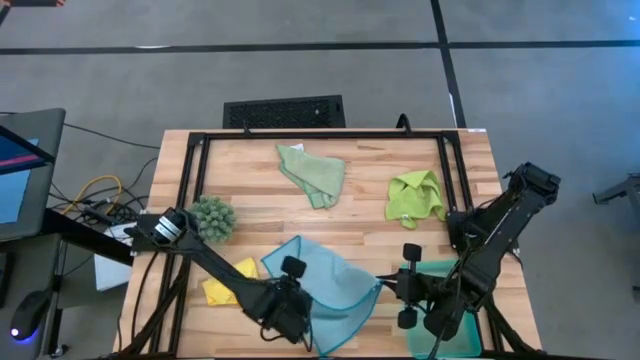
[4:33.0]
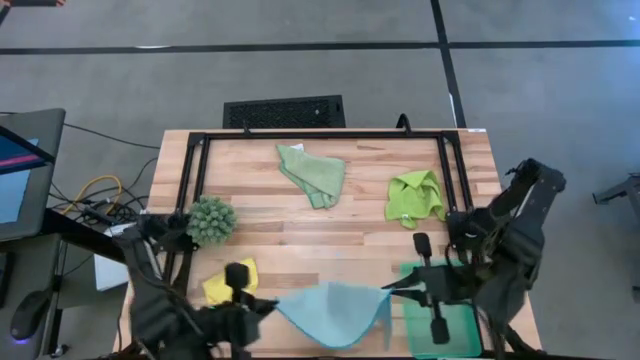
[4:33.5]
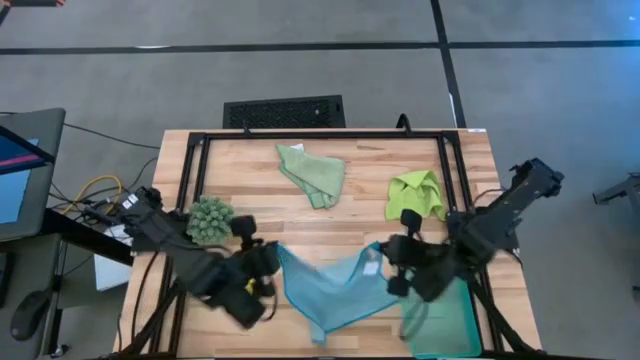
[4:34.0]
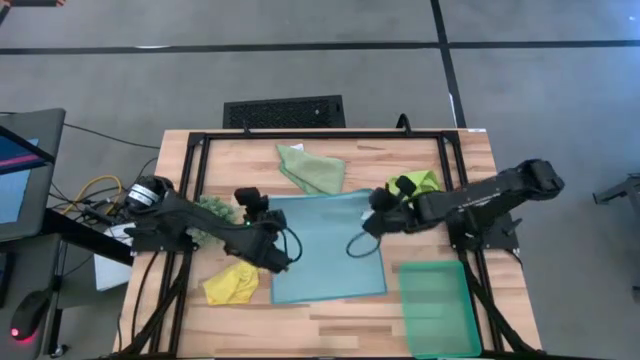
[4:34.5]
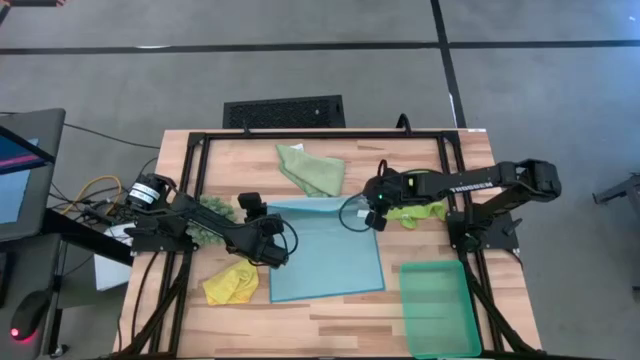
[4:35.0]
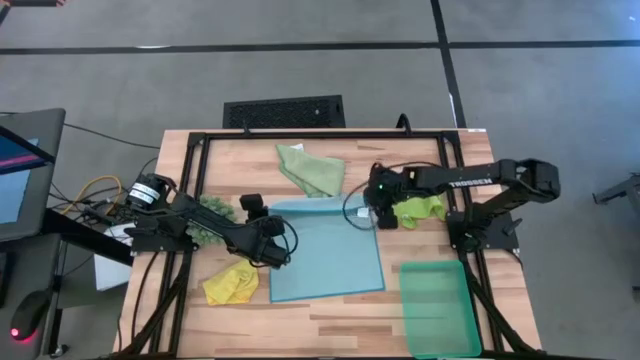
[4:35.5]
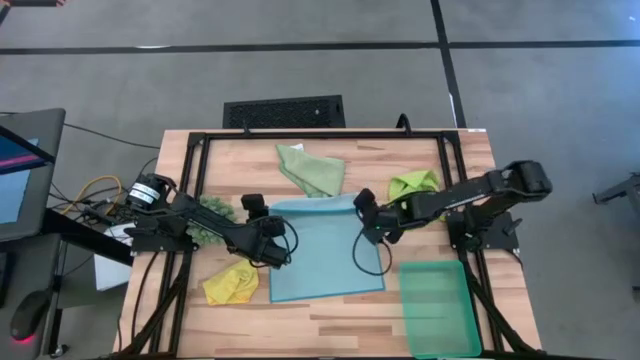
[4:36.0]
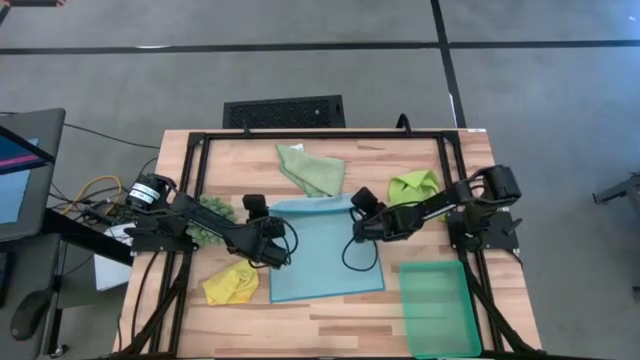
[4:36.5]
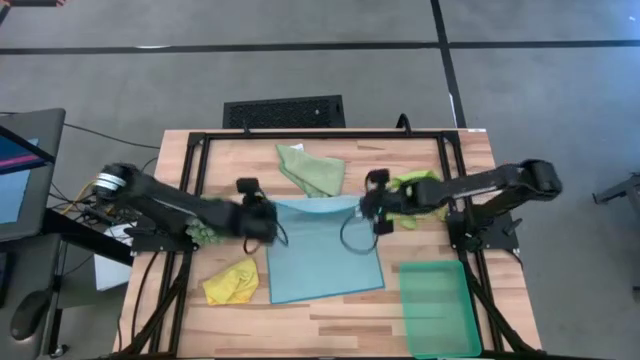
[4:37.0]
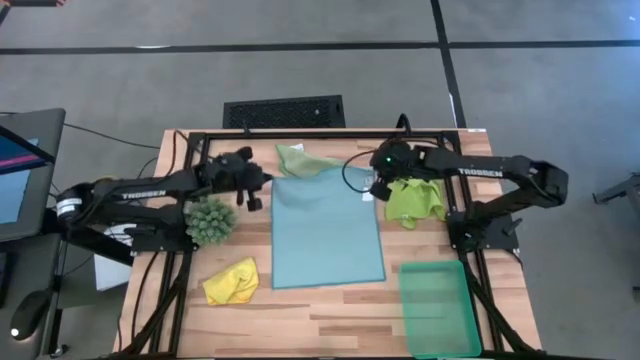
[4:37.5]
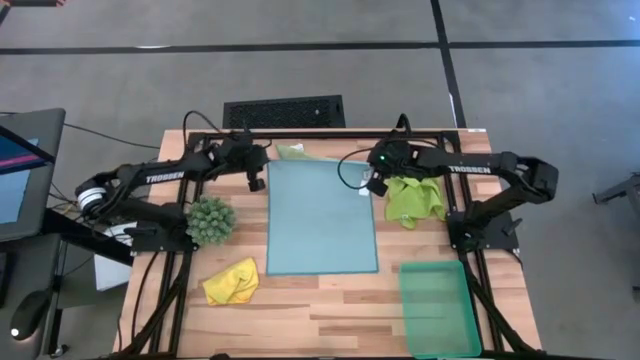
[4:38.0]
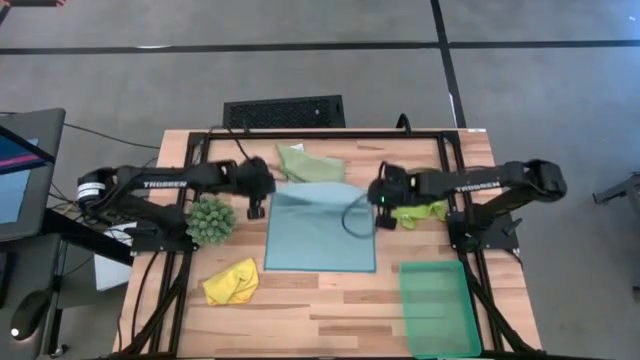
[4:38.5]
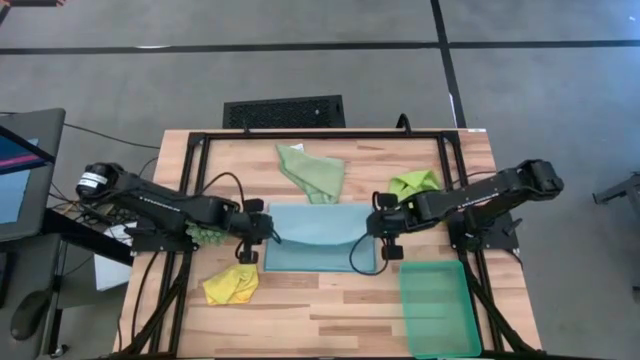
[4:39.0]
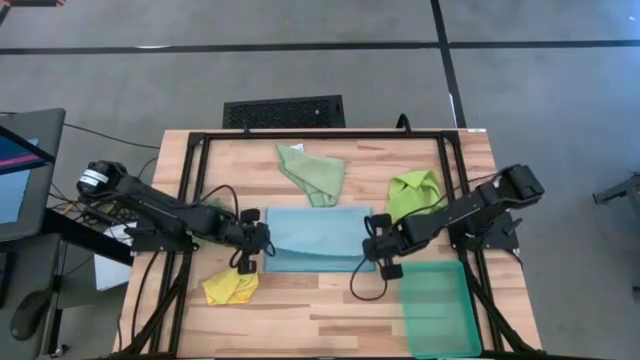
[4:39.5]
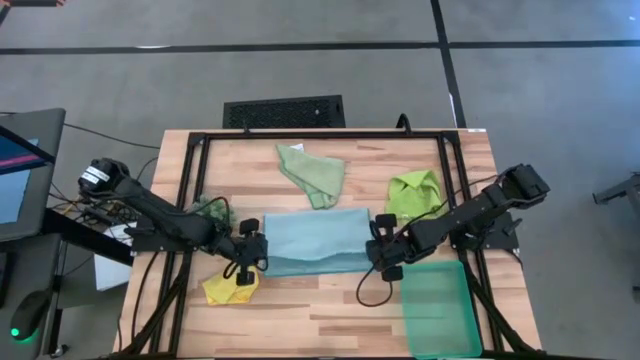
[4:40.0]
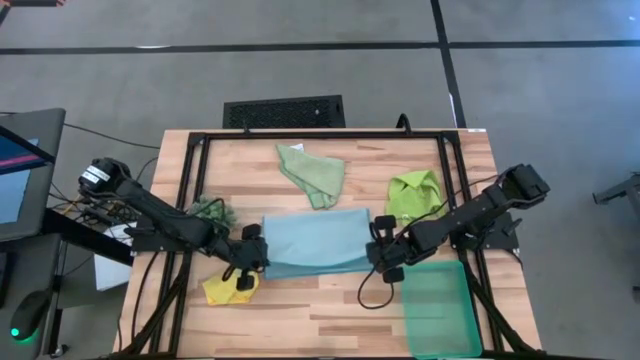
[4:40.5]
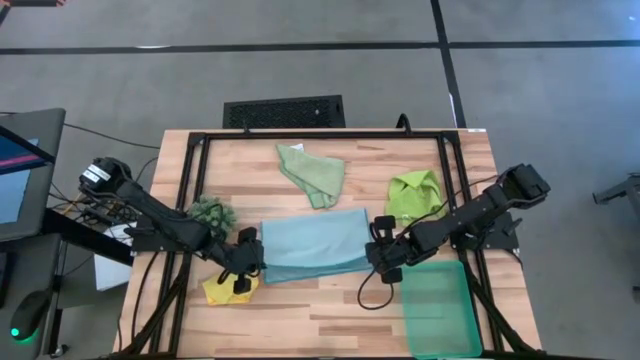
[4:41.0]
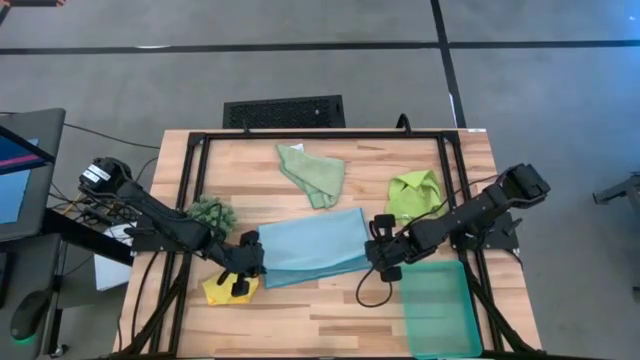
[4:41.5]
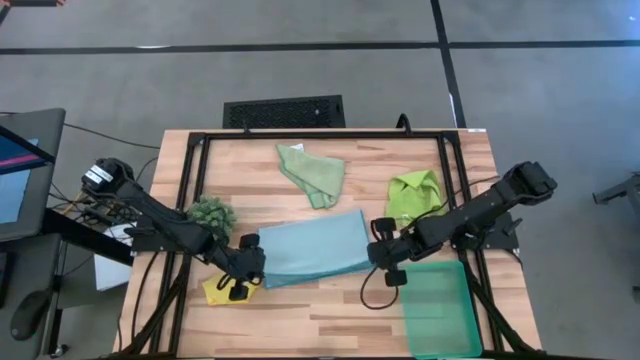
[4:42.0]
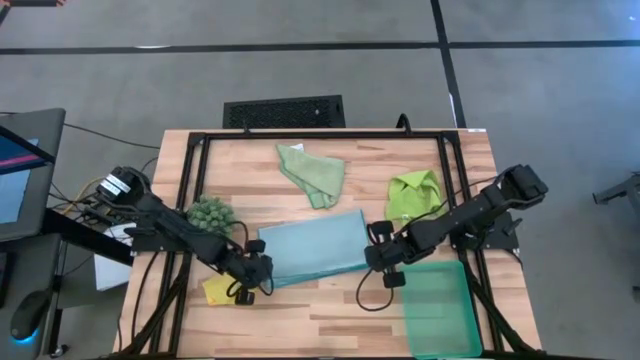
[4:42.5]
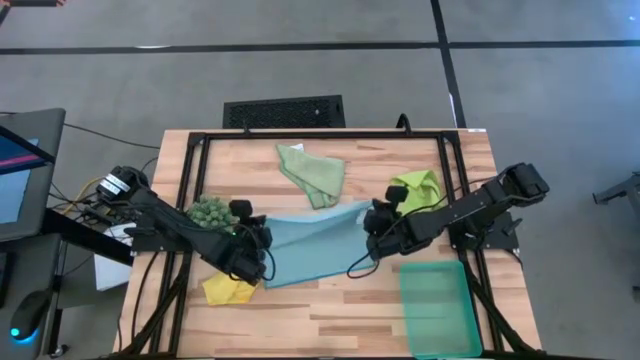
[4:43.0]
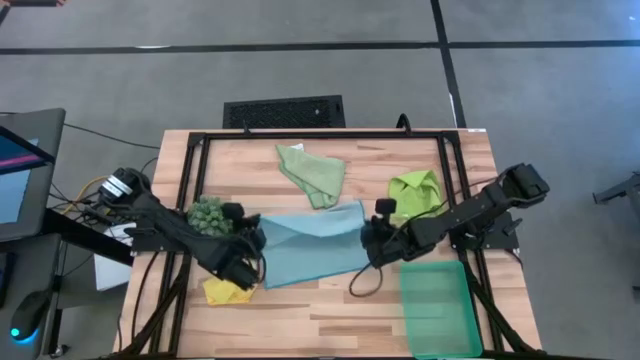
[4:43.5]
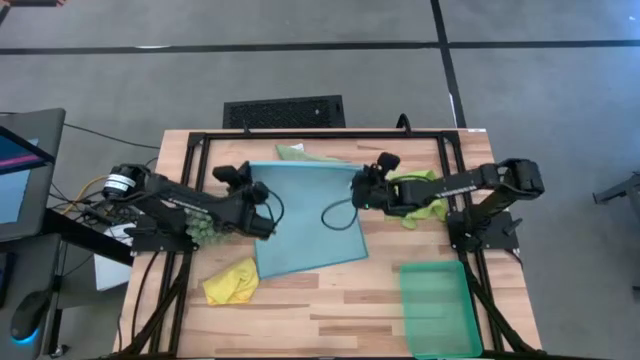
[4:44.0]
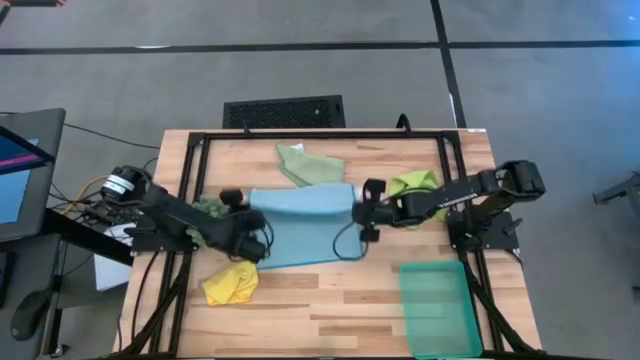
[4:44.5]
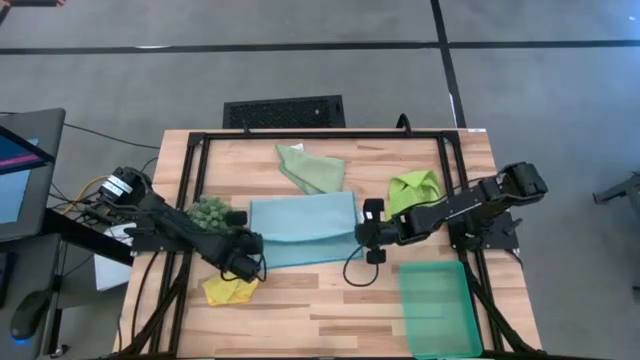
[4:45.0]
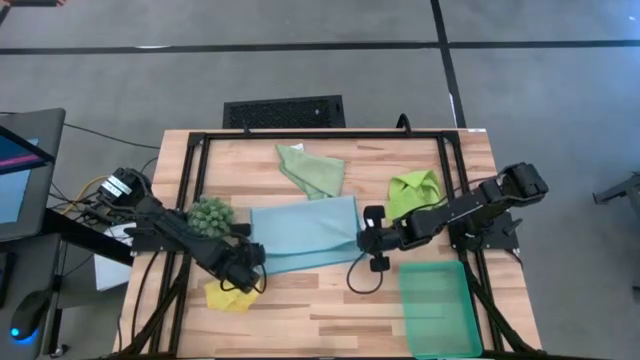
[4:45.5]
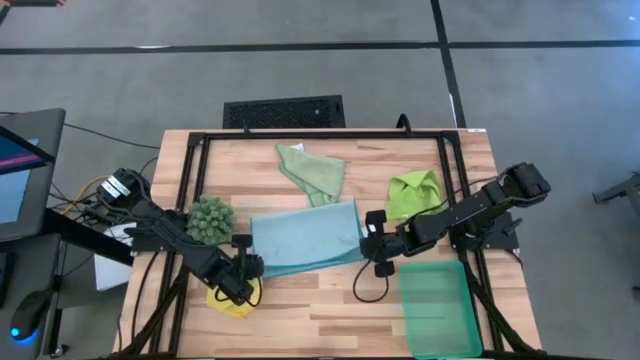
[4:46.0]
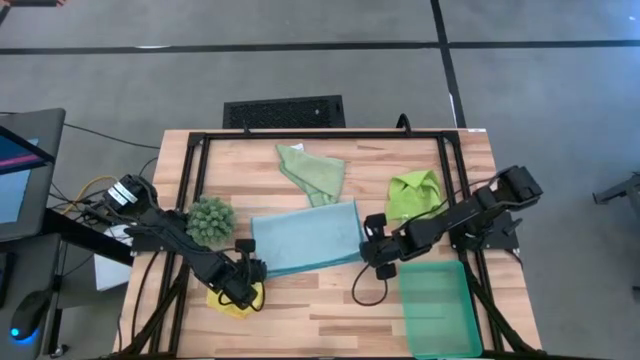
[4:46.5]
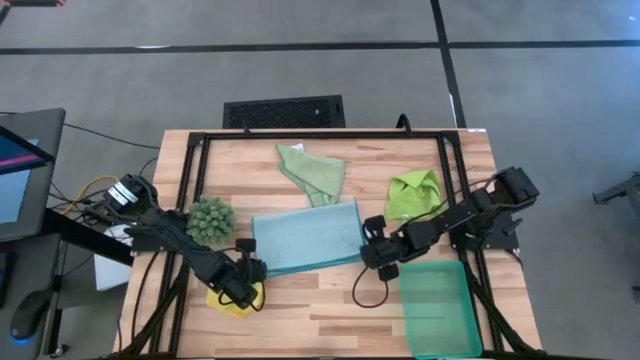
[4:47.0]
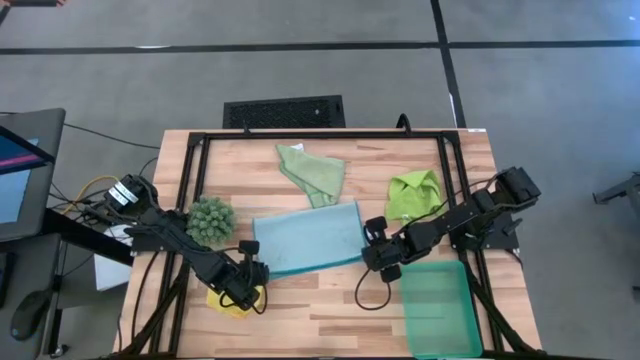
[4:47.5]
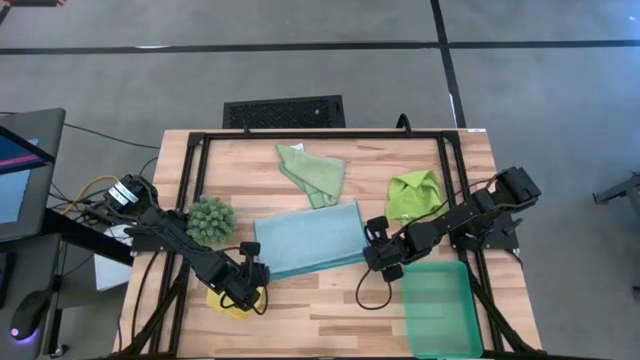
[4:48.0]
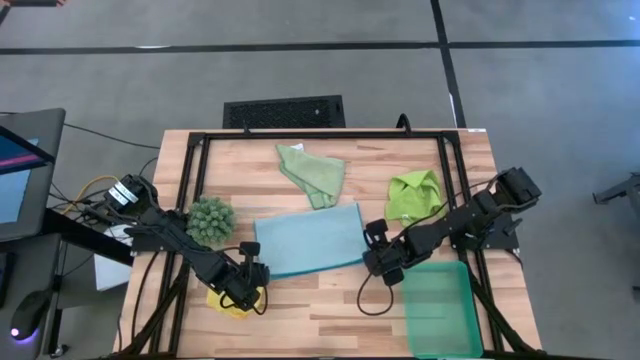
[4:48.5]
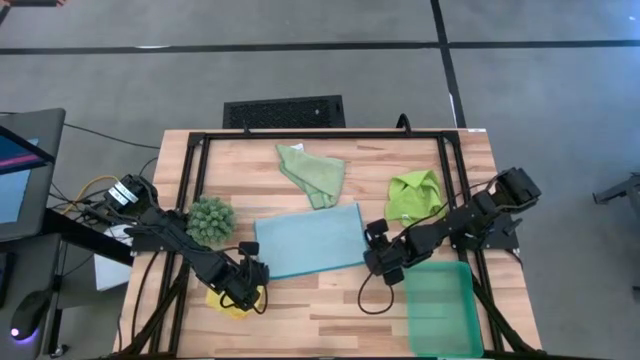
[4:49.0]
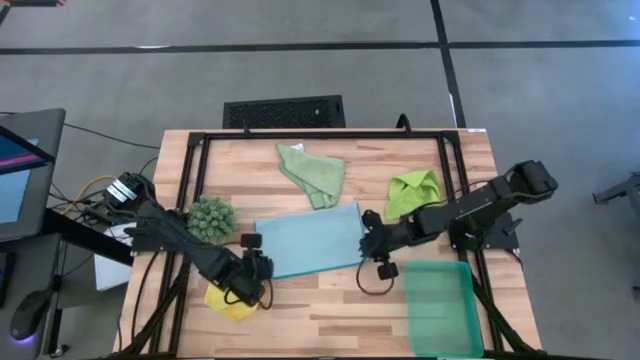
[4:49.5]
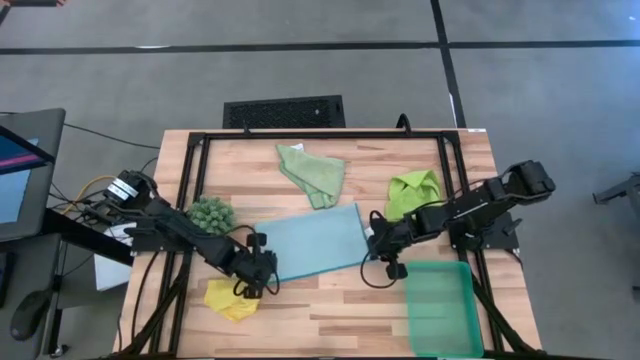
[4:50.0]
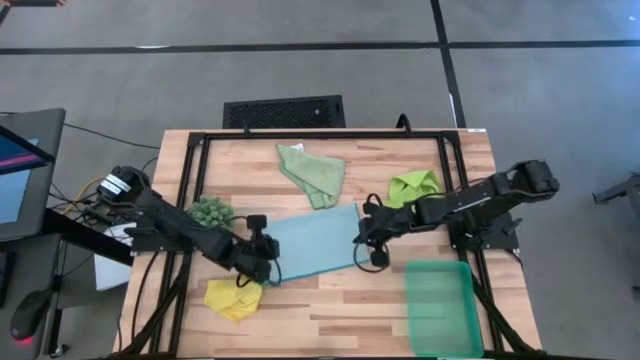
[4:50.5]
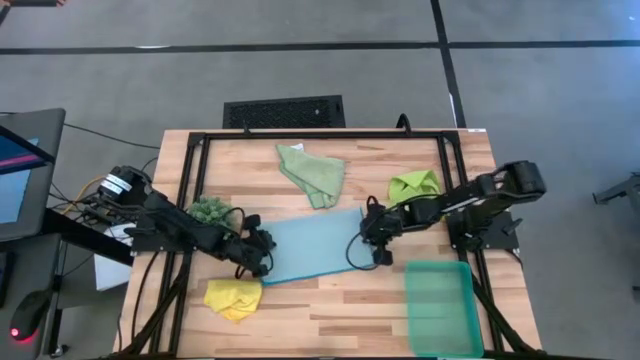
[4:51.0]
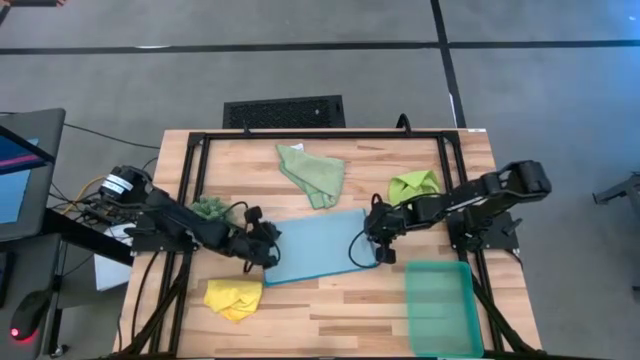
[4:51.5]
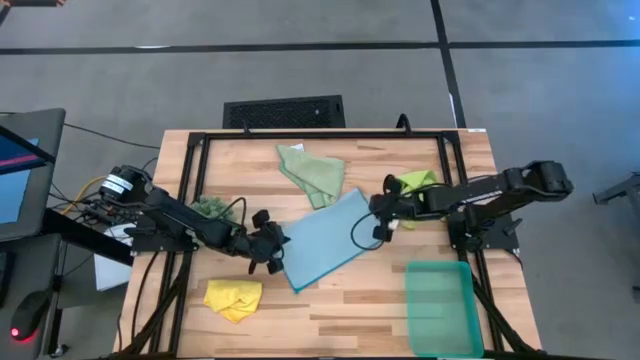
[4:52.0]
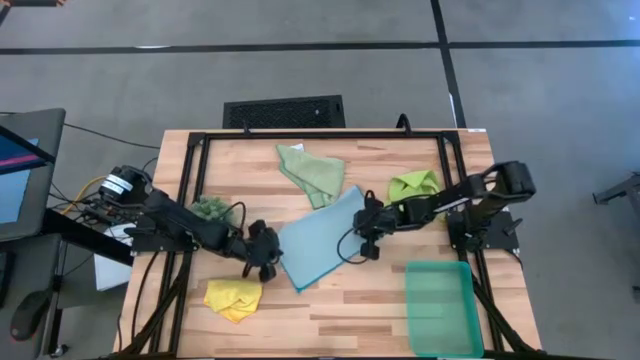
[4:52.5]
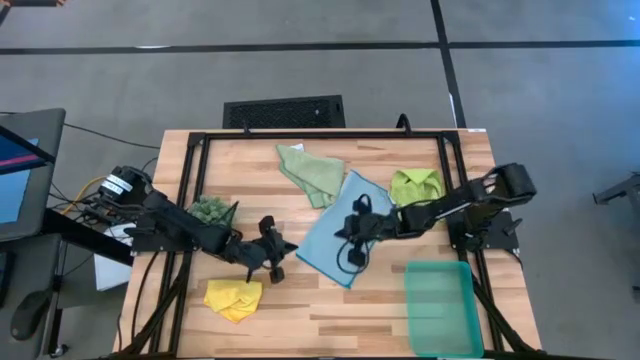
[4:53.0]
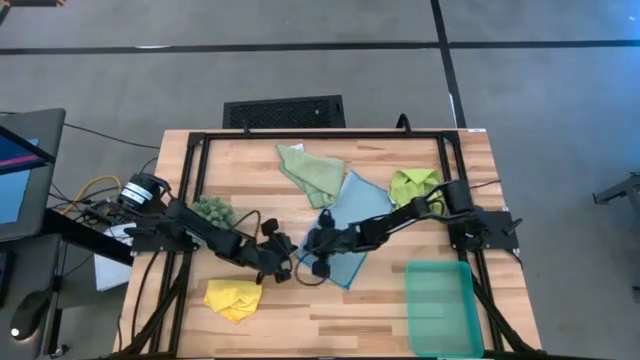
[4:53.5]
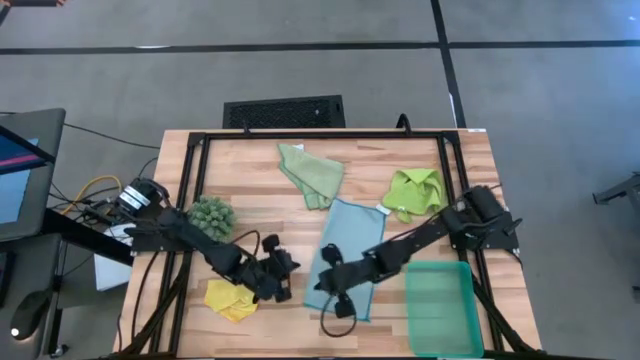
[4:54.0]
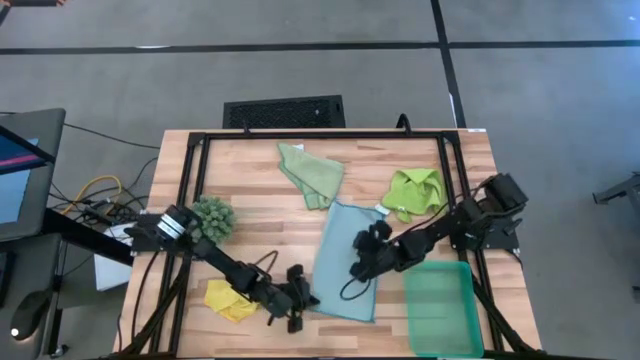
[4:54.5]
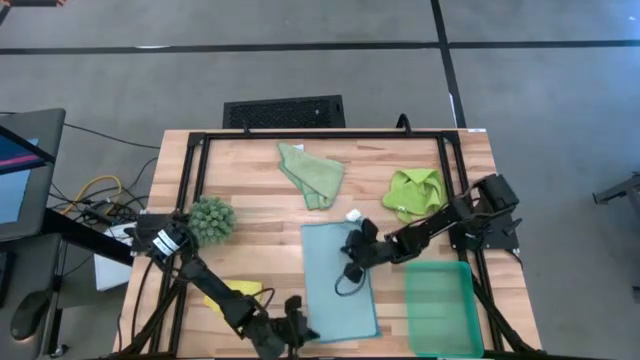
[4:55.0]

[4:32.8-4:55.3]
Task: Fold microfiber towels
Fold the blue microfiber cloth
